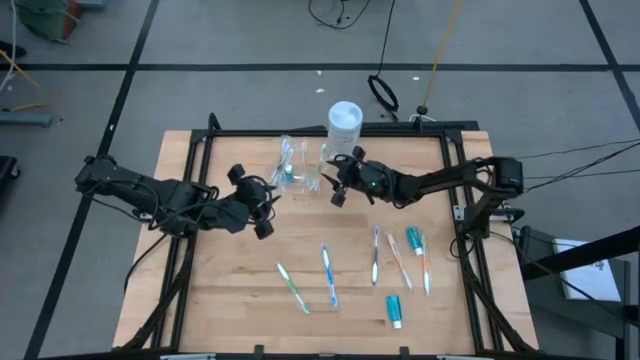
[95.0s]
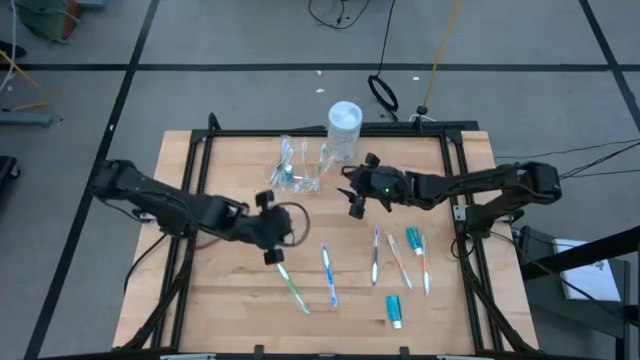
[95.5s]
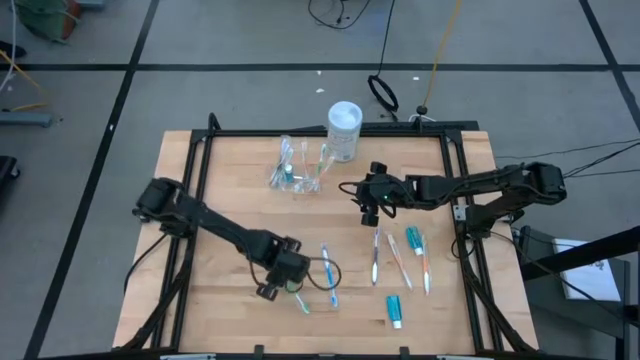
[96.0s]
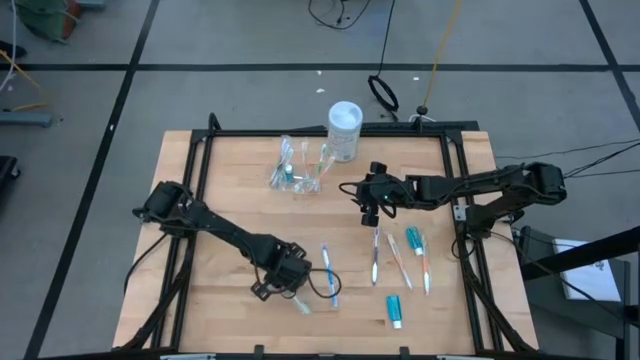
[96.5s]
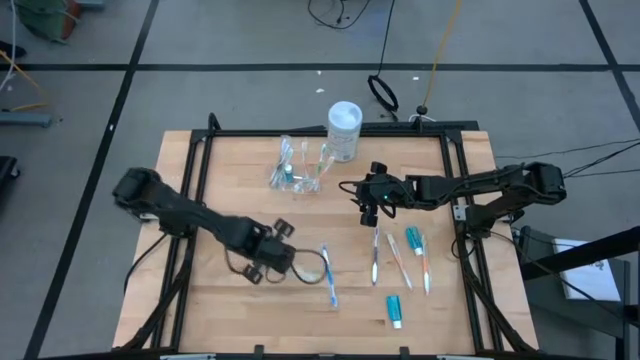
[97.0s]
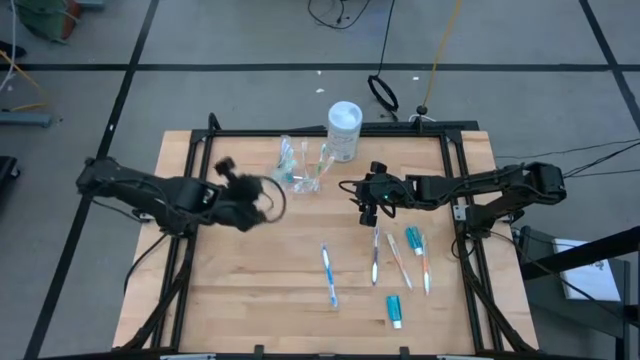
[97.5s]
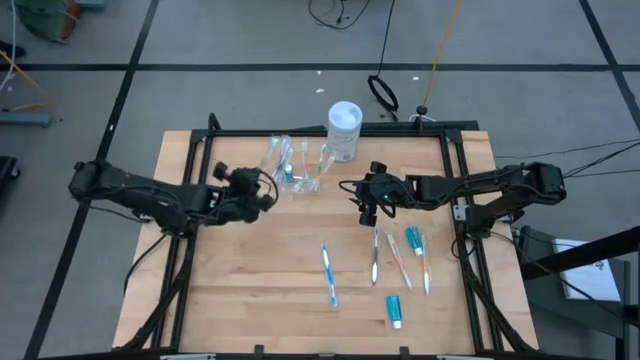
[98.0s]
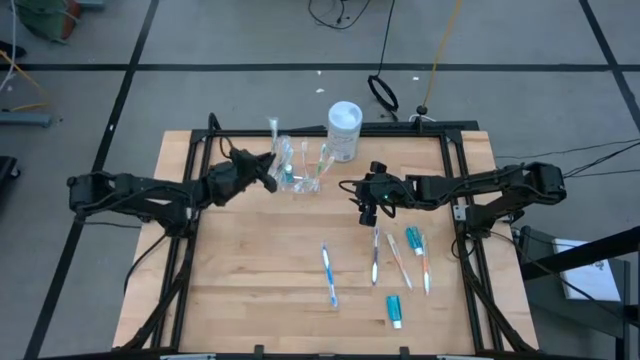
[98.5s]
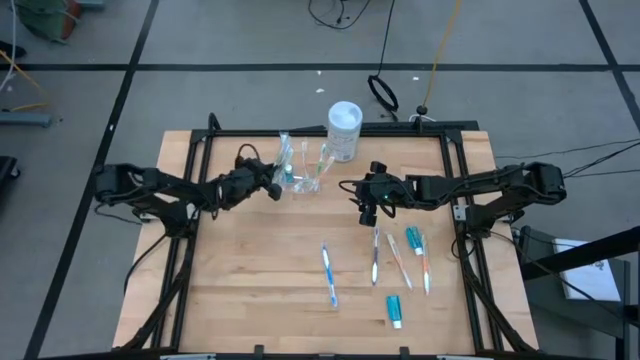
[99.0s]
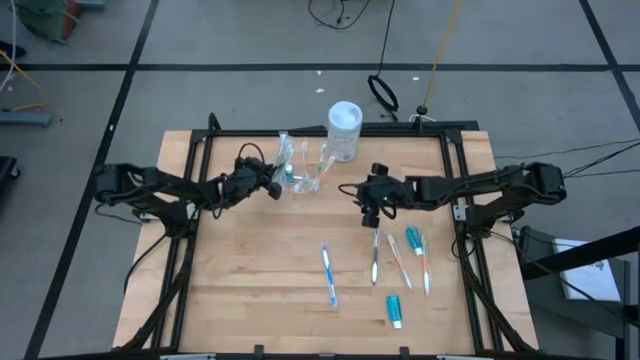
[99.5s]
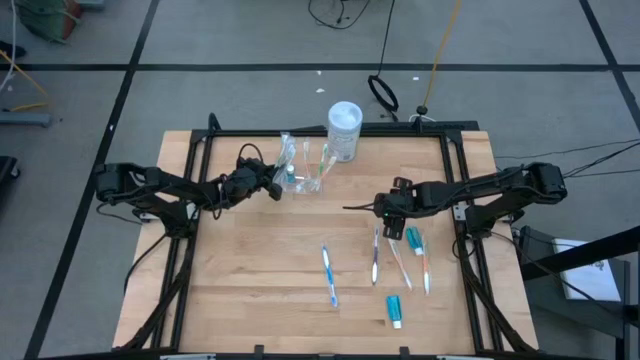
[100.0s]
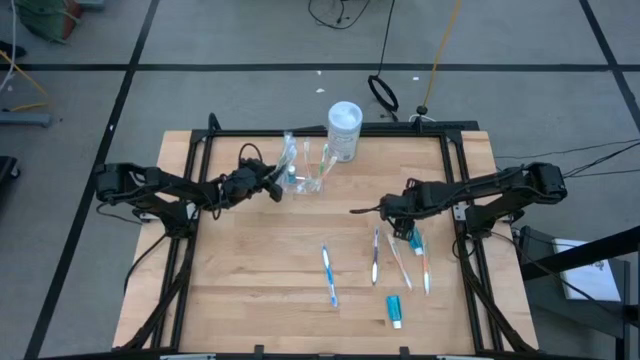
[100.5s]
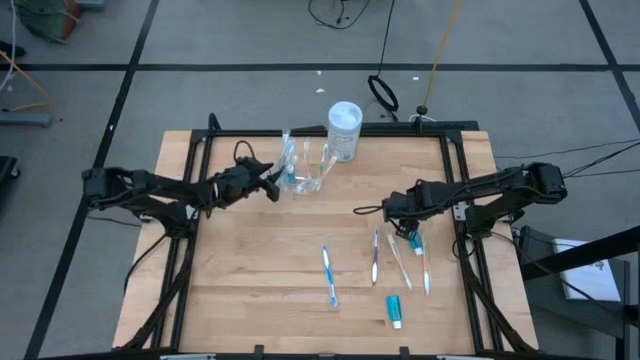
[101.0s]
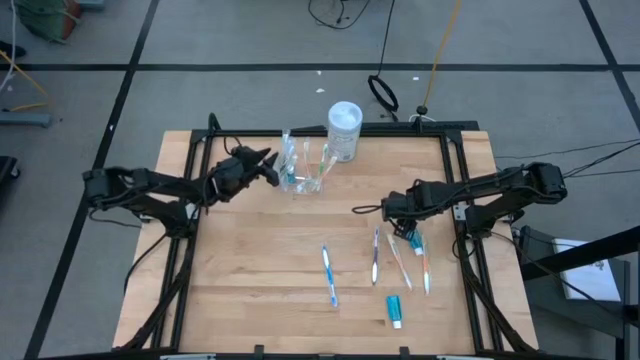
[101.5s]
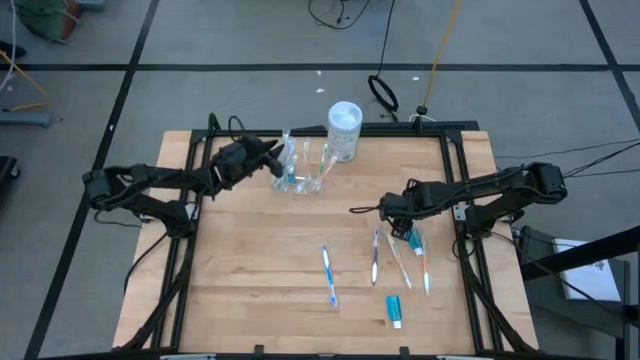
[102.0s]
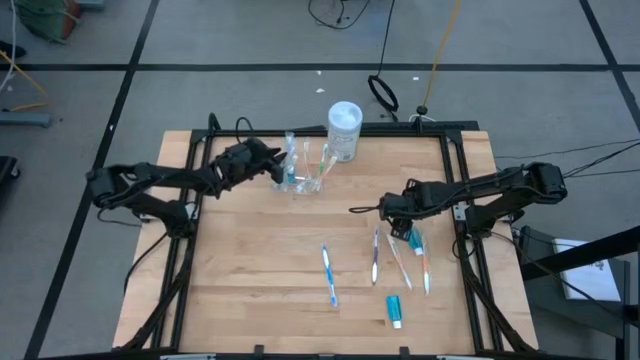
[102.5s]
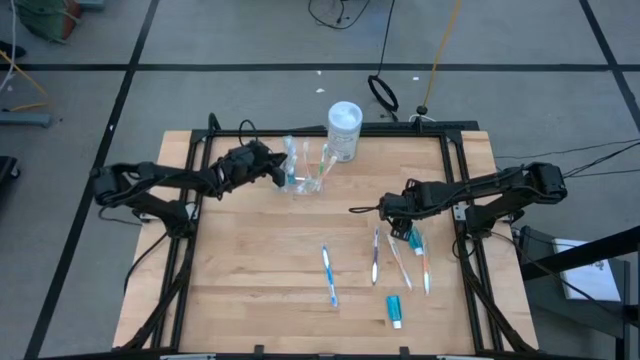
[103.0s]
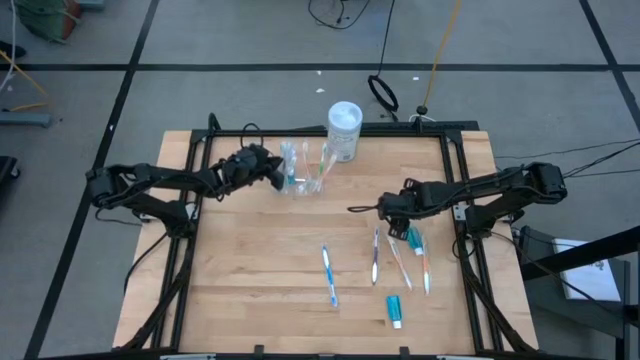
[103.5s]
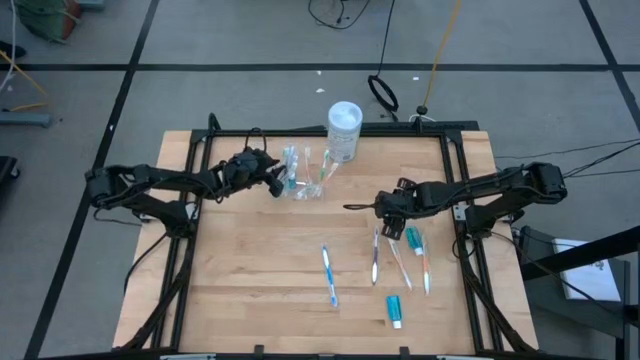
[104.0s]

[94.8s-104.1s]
Task: Pick & Place toothbrushing station
Put the green toothbrush into the transparent organizer

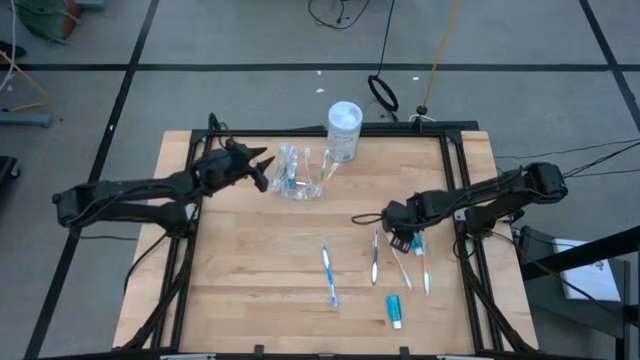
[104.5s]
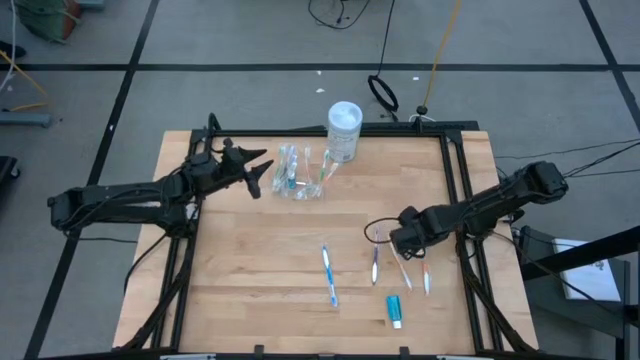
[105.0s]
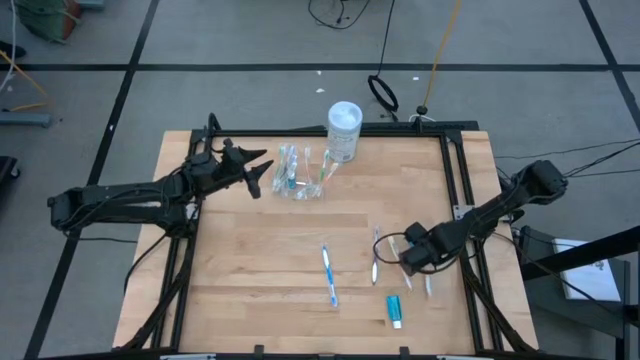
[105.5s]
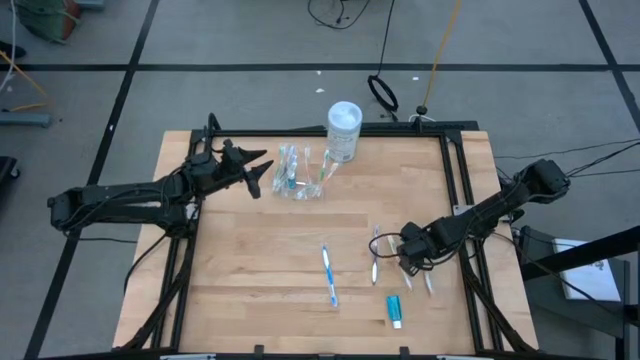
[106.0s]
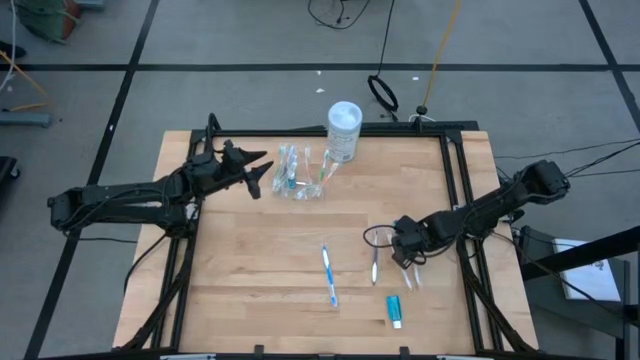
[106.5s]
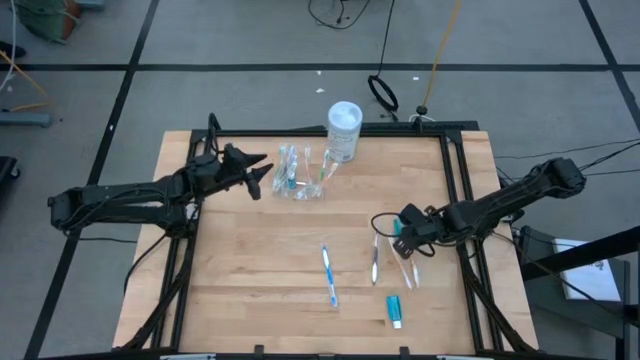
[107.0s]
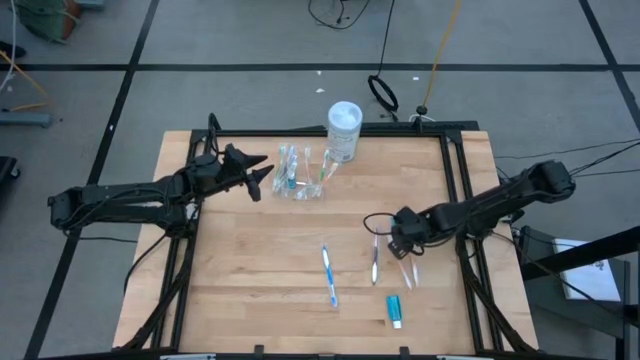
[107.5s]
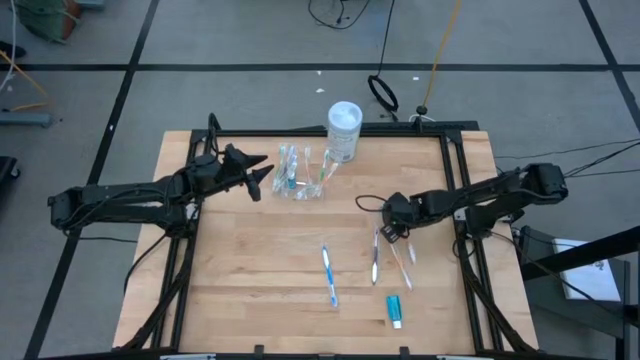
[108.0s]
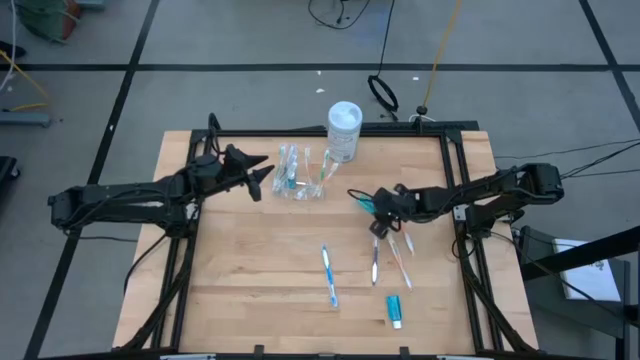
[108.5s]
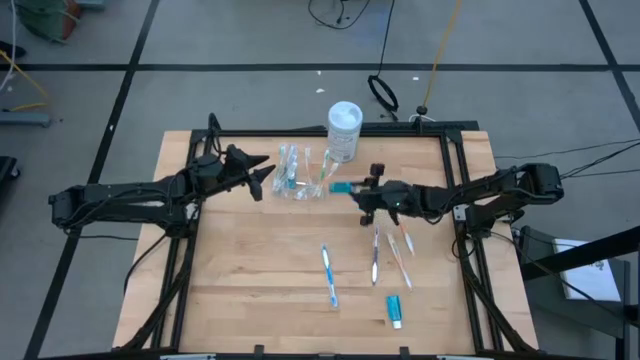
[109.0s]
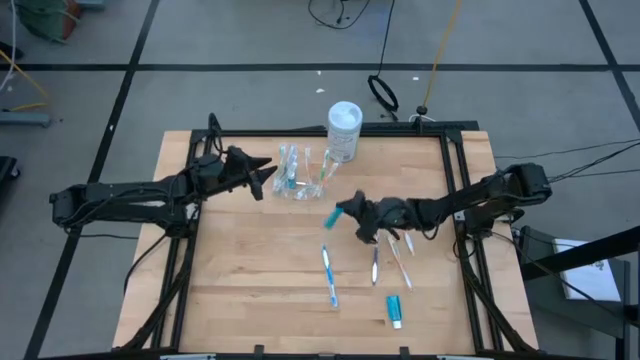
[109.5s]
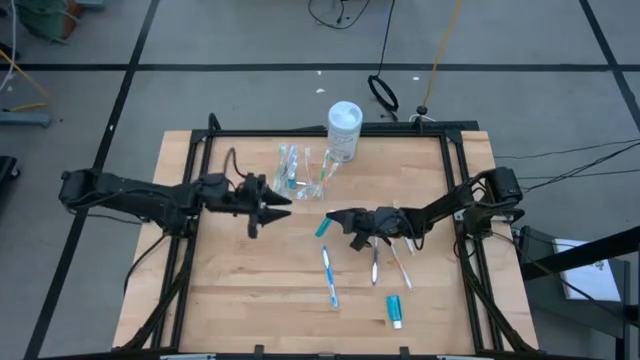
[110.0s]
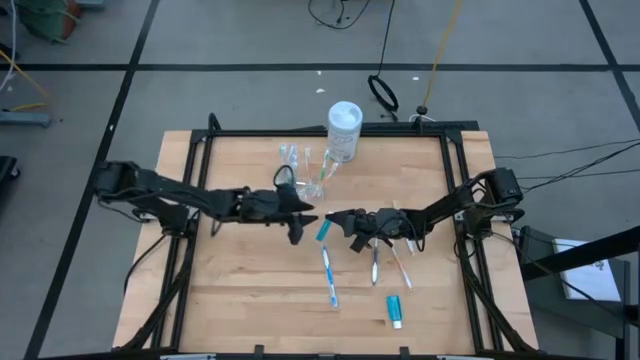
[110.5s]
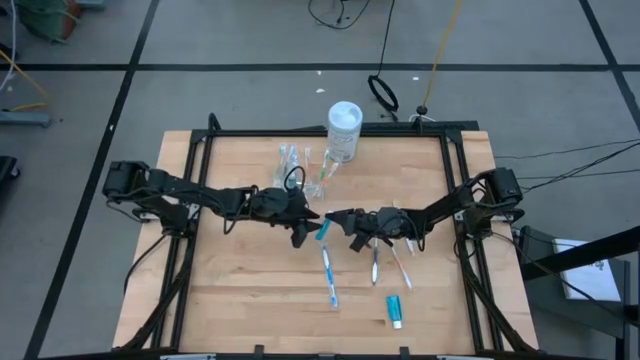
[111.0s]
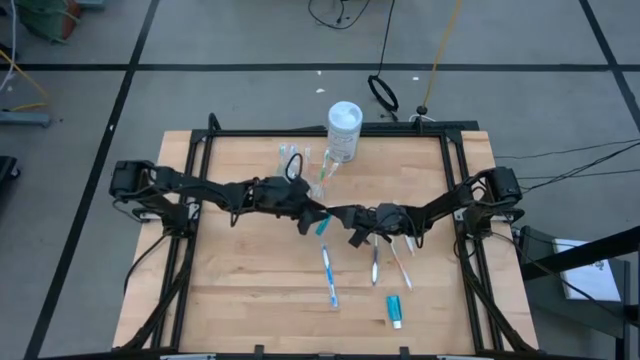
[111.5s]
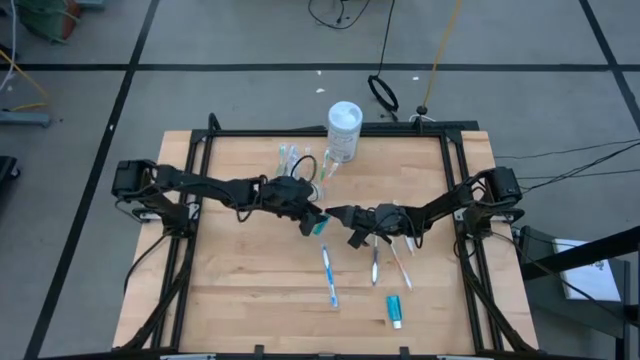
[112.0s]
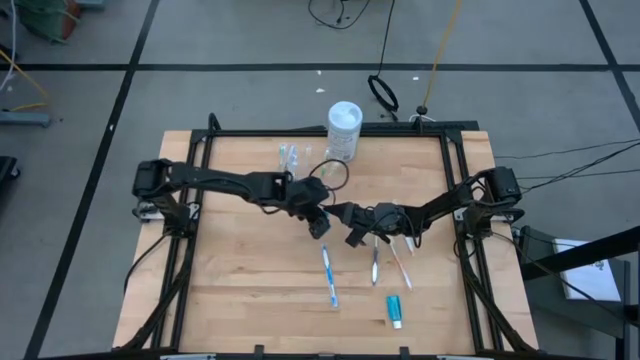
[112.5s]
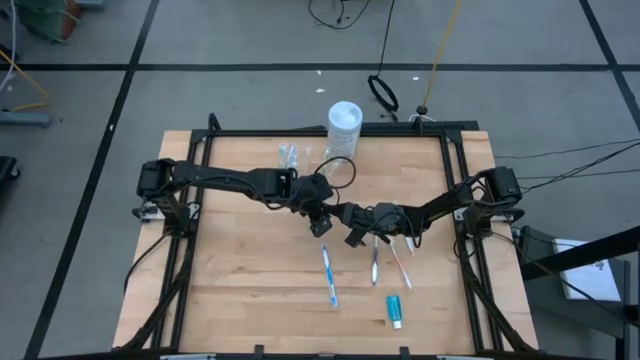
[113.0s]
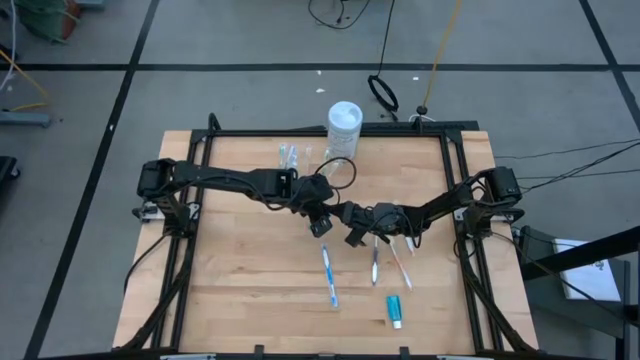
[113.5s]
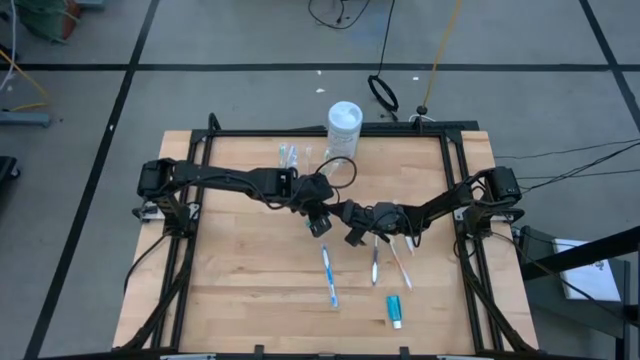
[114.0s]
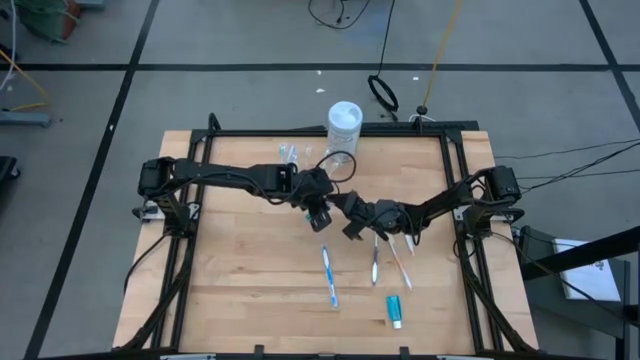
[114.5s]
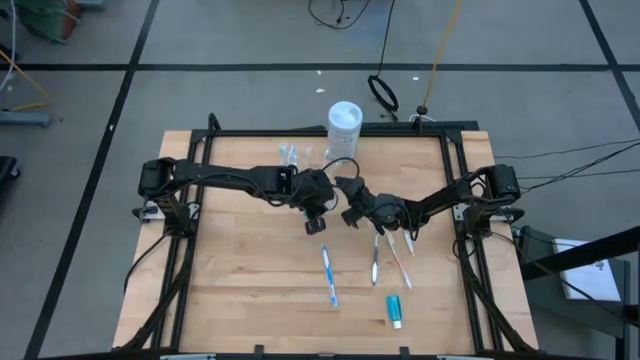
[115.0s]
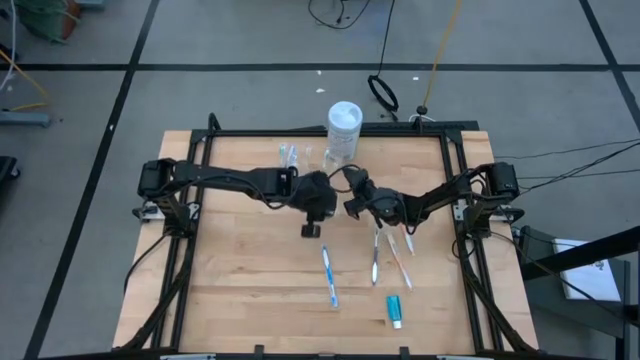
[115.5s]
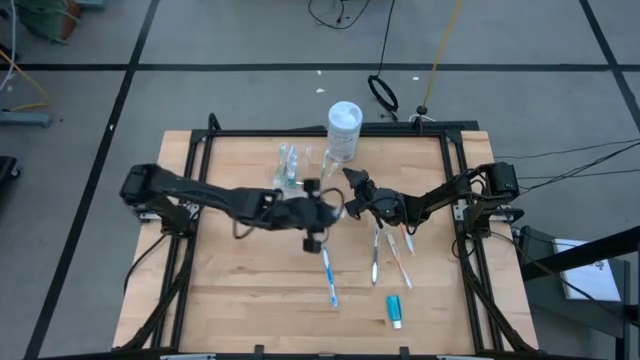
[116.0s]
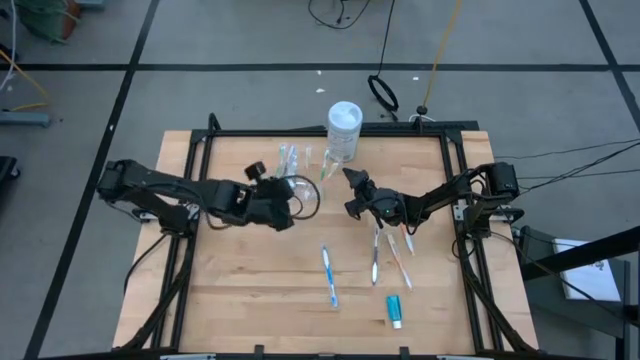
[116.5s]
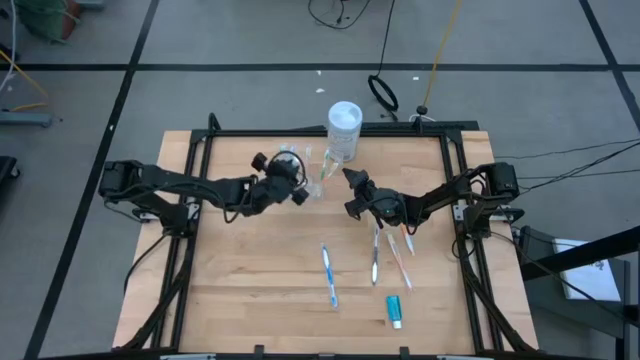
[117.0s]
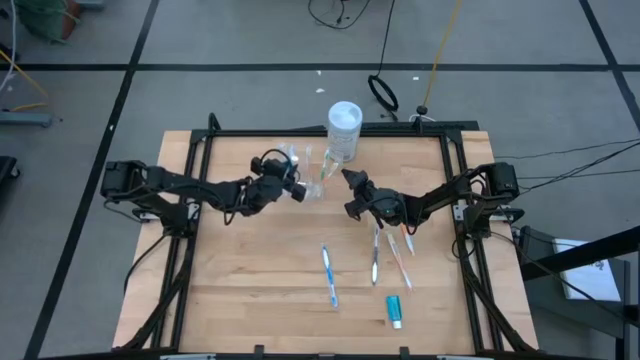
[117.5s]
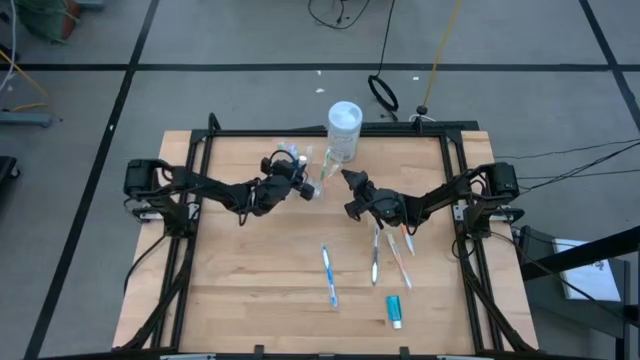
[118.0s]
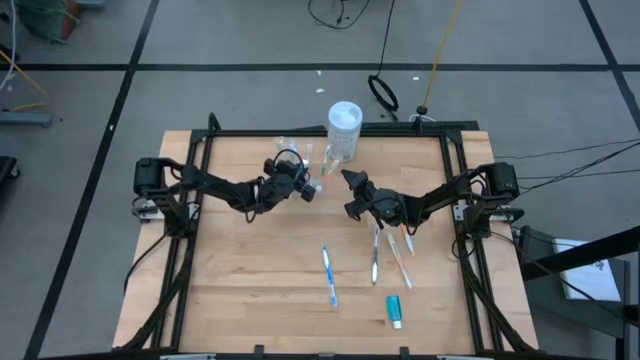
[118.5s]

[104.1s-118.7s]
Put the blue mouthwash into the transparent organizer
